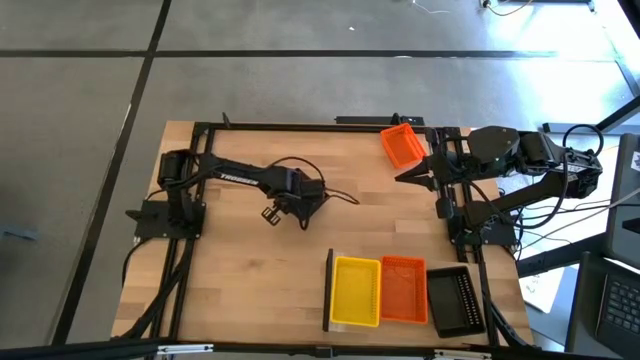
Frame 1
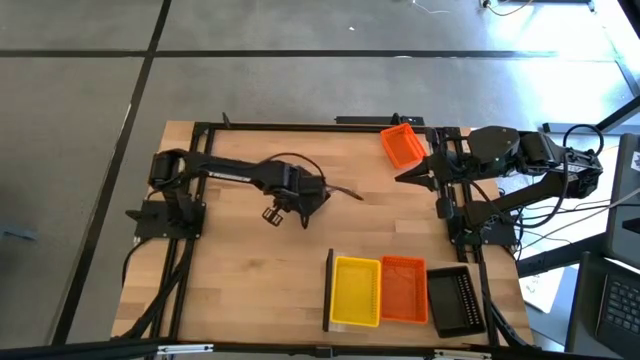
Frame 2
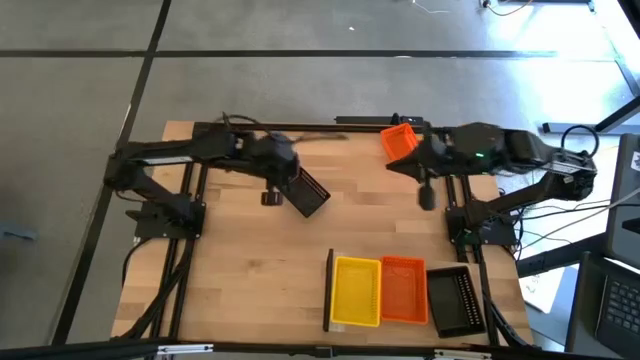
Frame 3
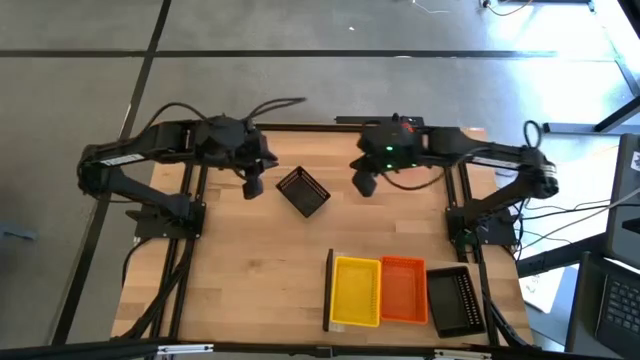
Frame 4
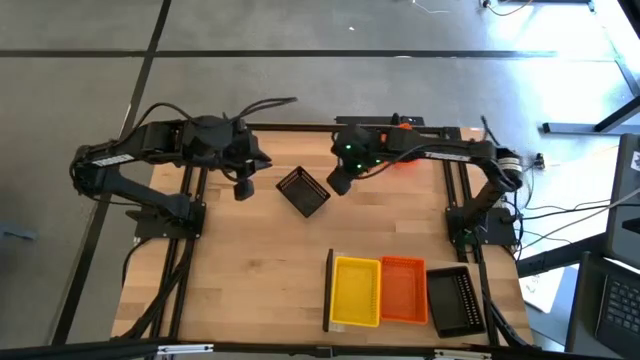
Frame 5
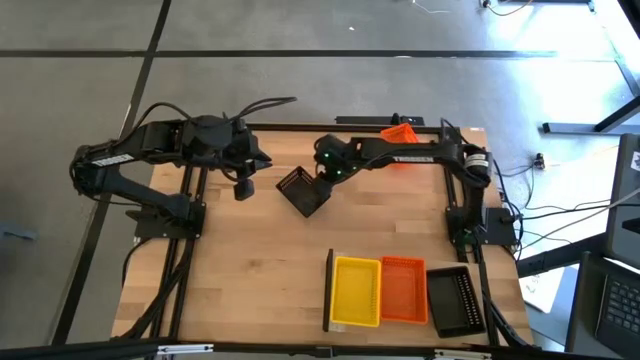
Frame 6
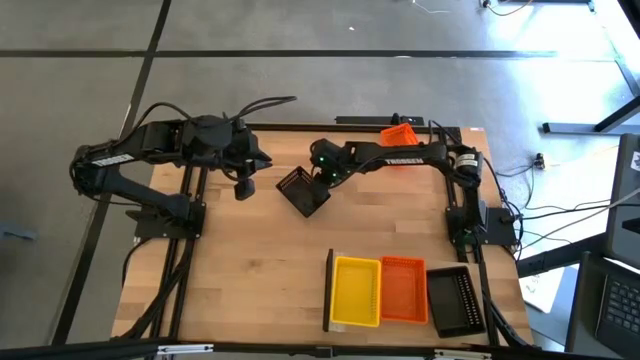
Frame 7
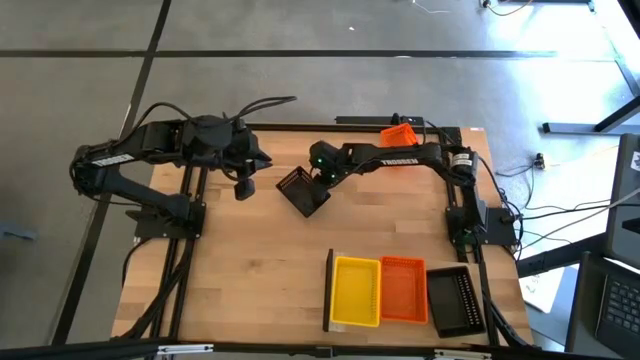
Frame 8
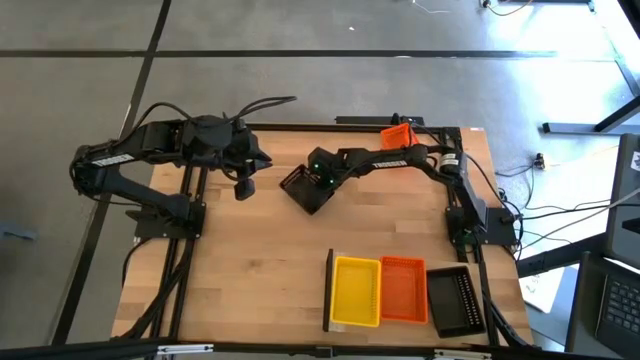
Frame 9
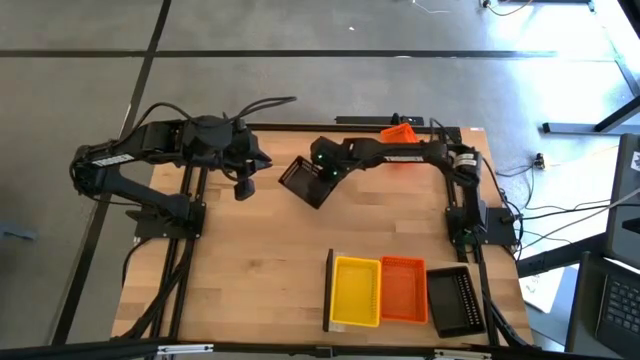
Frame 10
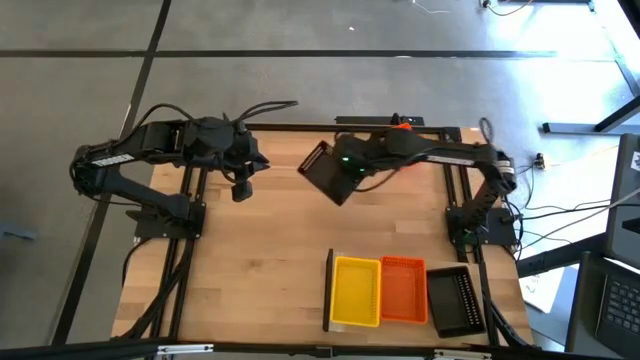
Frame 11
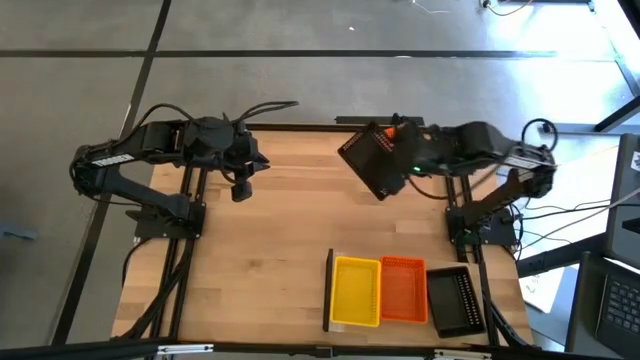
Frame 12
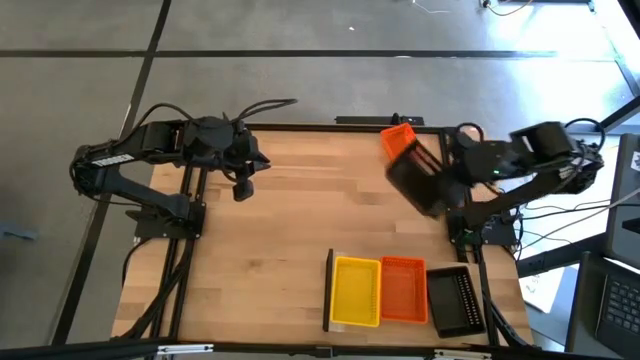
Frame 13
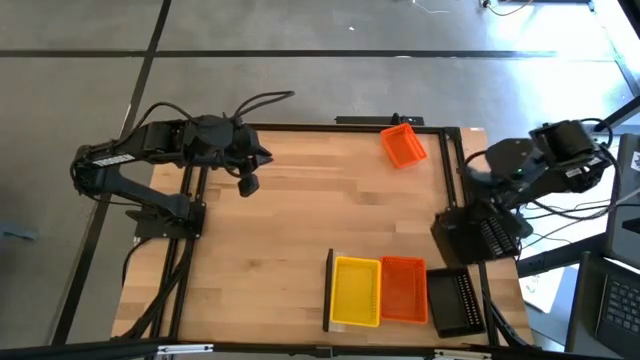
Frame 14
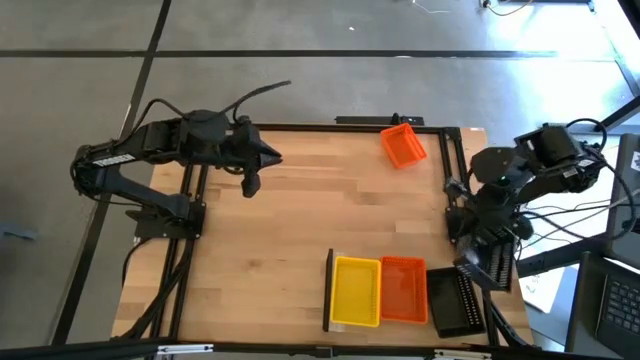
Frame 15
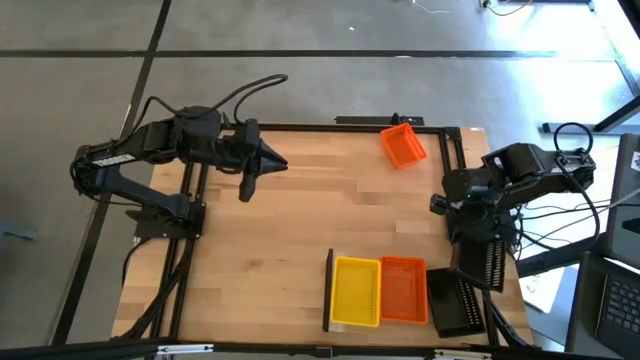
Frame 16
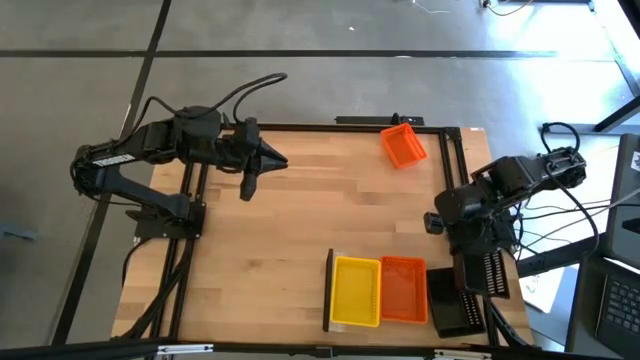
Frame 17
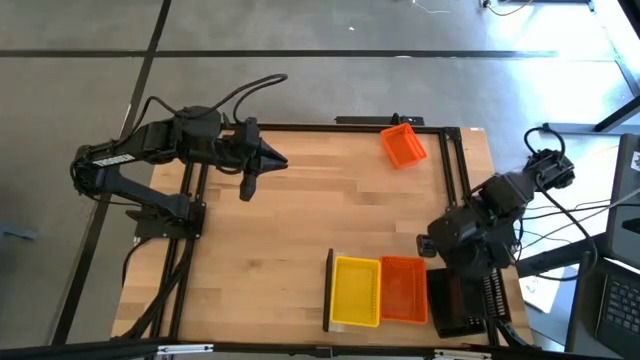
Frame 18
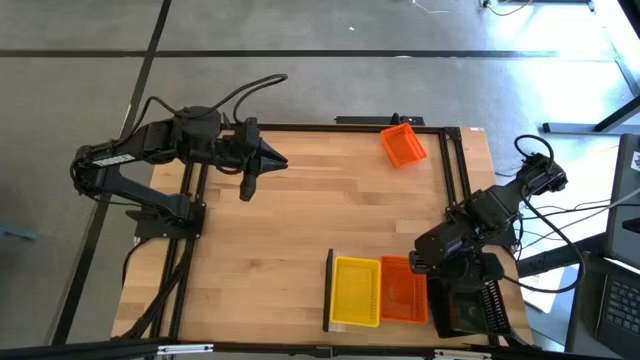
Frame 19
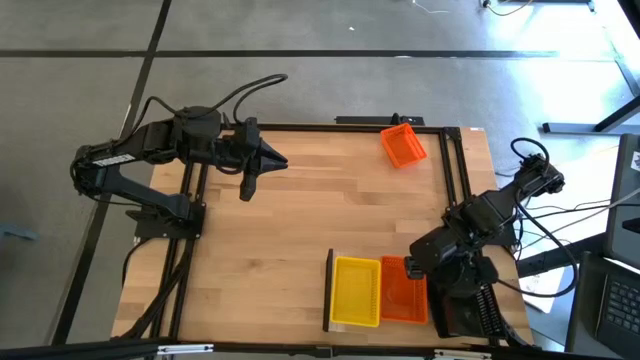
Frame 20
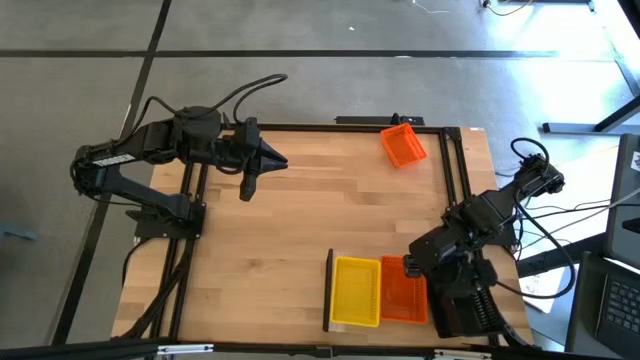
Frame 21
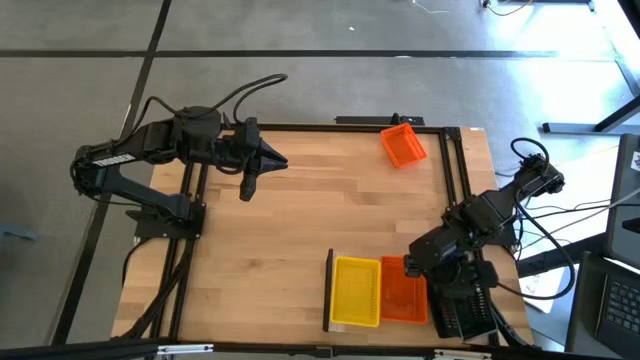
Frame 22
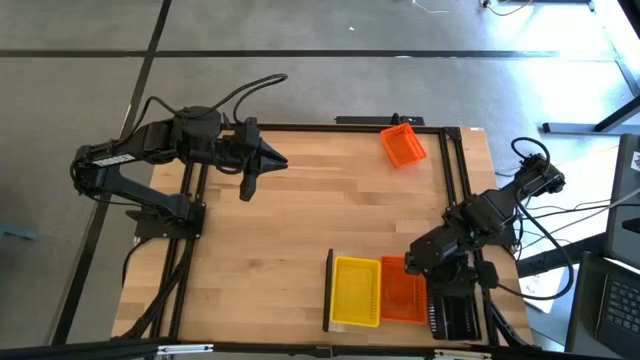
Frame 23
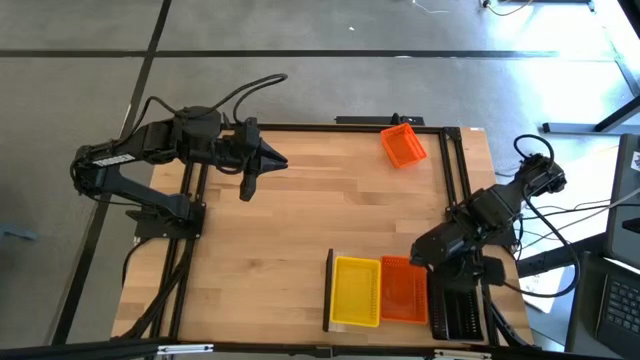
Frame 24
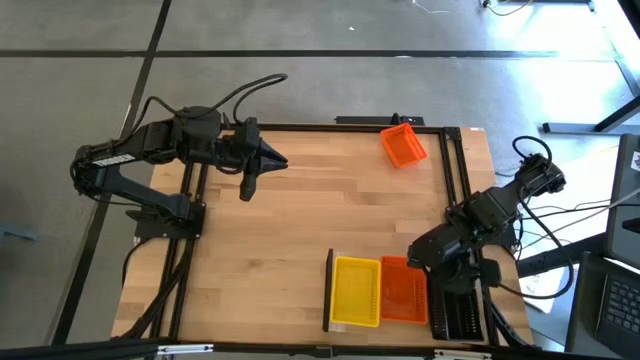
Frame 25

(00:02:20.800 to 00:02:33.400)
Task: Stack baskets on shelf by color
Stack the black bin on top of the black bin

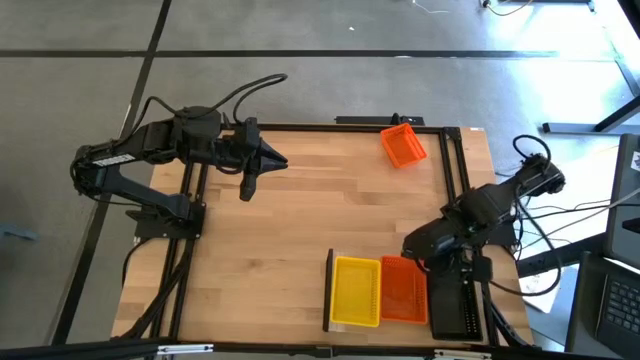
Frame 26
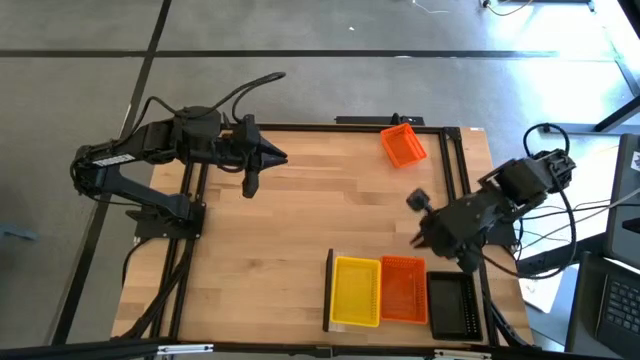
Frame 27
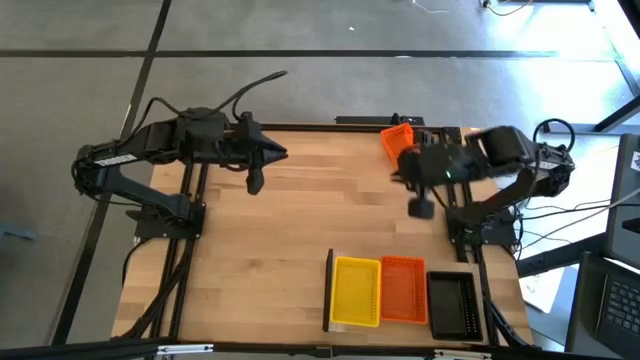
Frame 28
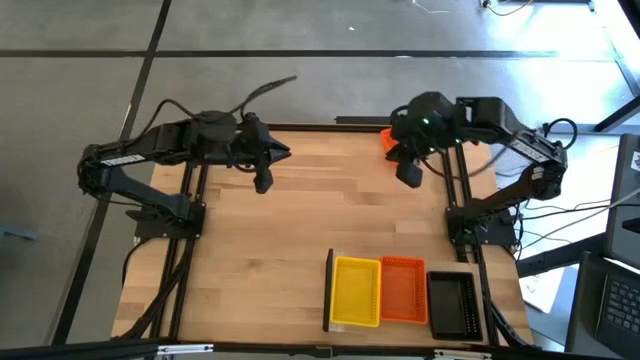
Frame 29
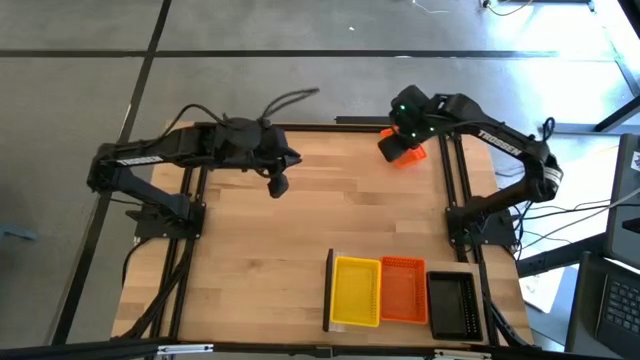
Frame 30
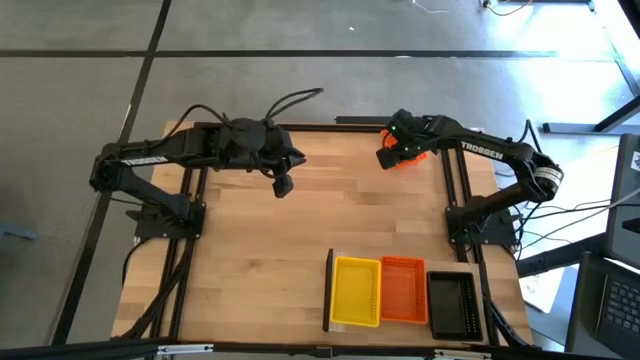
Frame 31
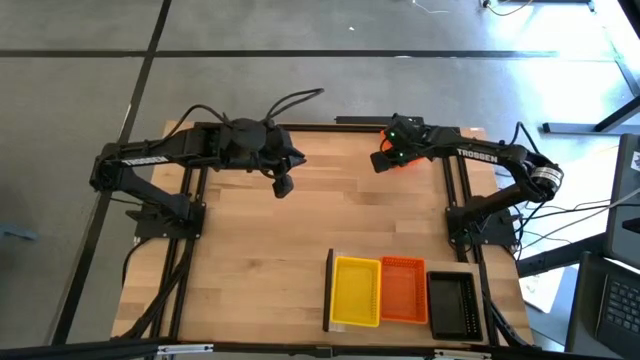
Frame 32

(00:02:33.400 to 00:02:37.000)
Stack the orange bin on top of the orange bin

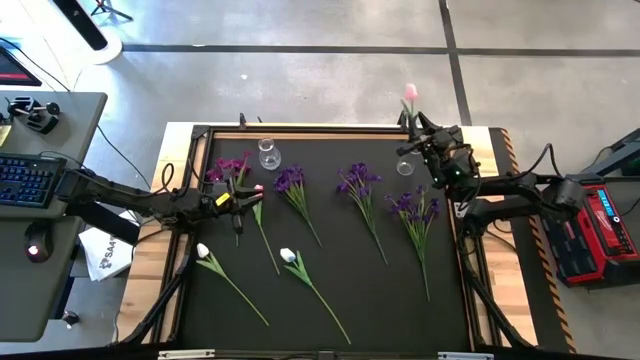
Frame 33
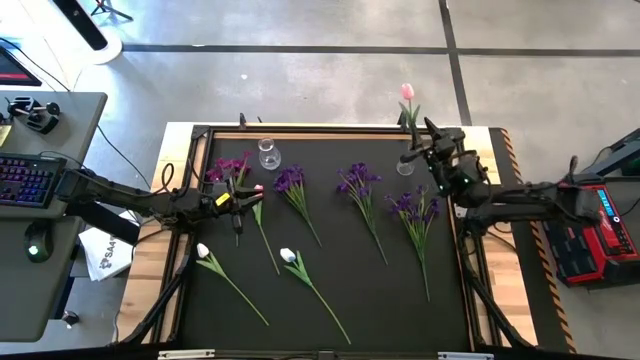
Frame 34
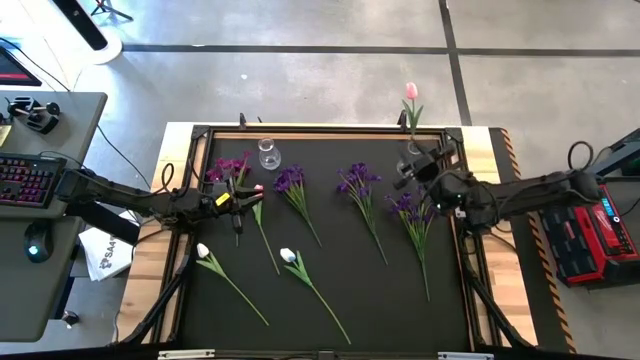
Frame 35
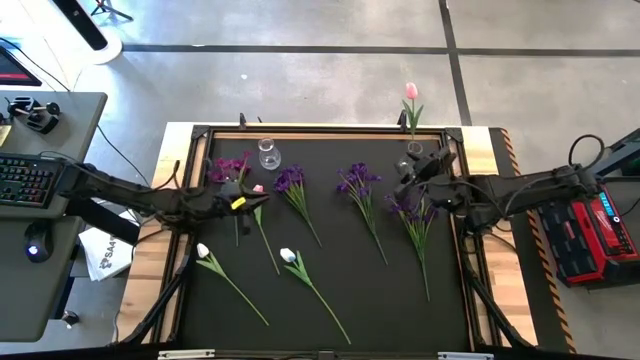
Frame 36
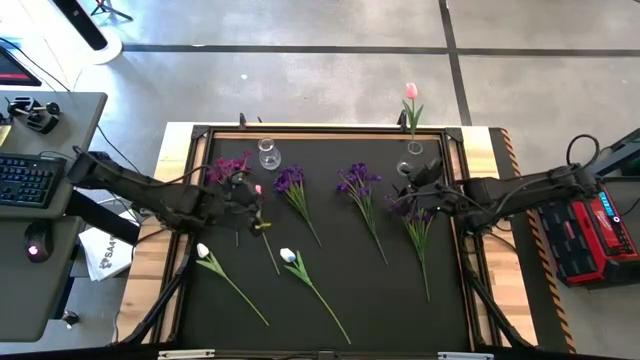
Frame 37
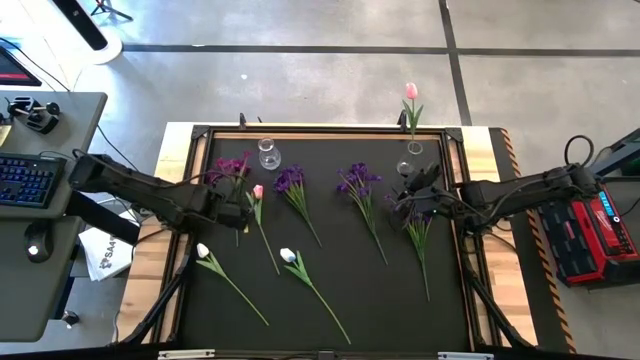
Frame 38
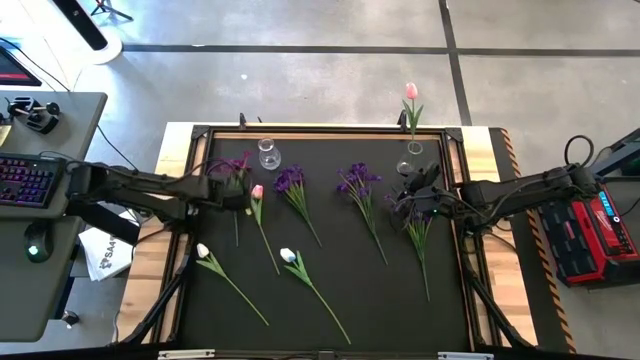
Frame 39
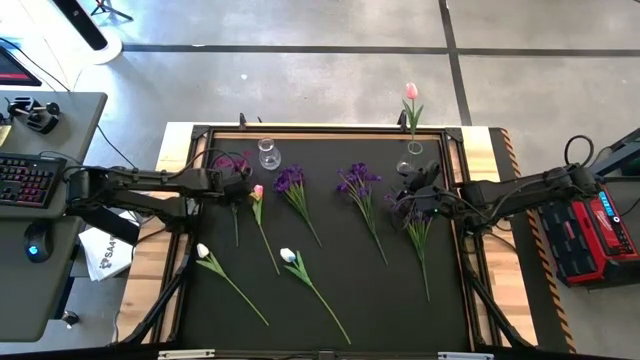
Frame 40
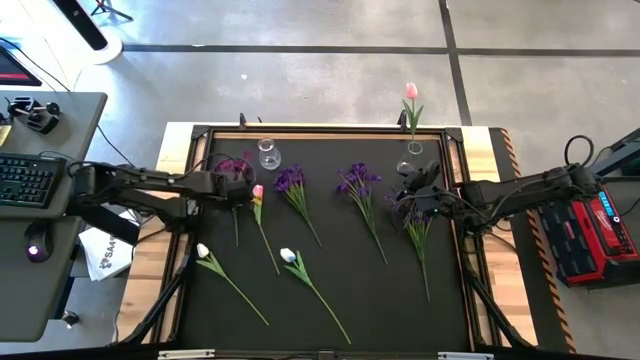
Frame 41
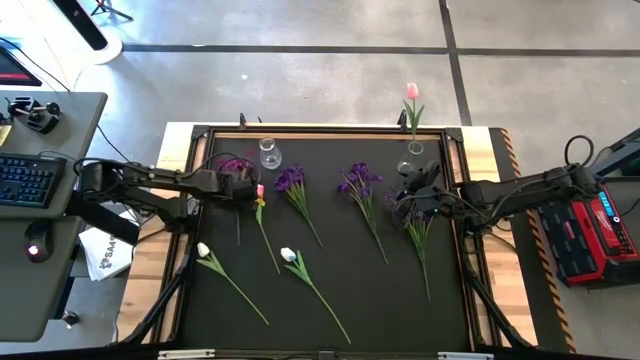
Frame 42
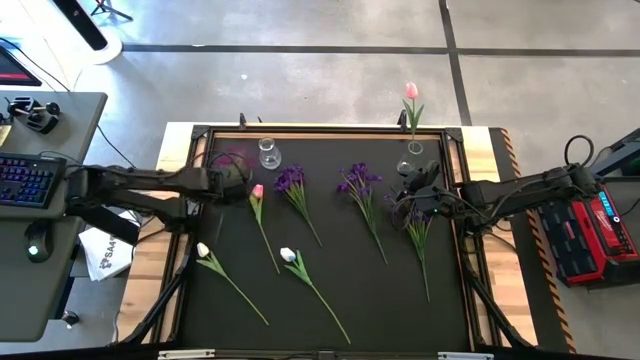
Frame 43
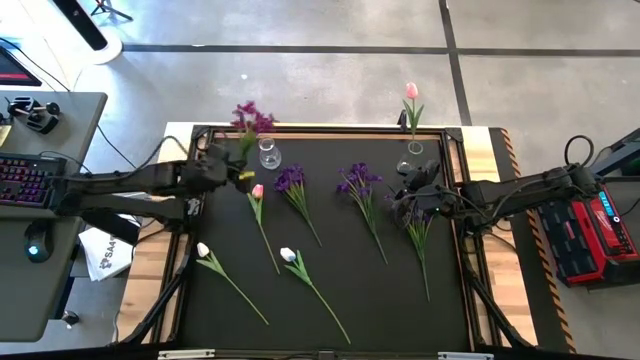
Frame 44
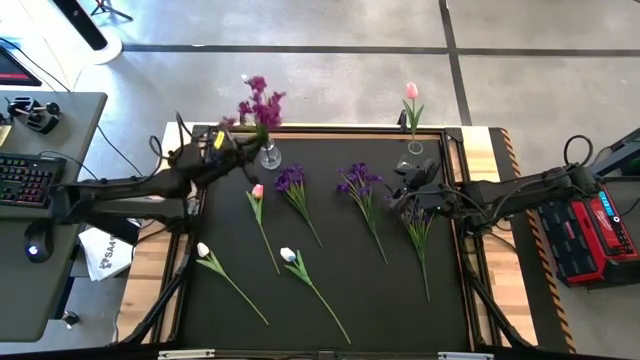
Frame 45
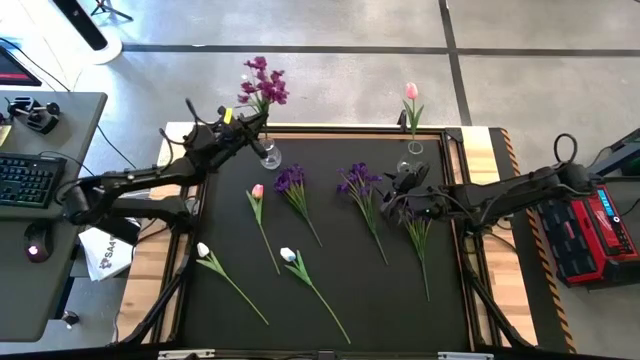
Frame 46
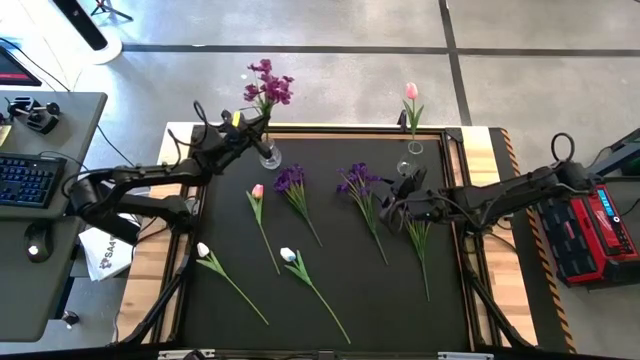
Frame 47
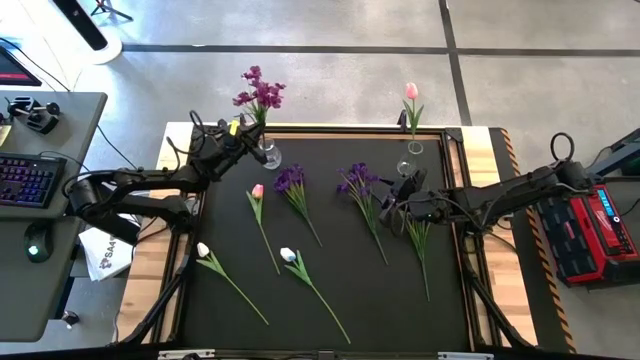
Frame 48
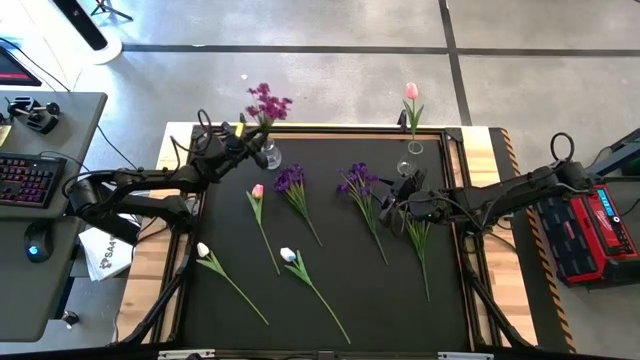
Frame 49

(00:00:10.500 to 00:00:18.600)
Task: Sort flowers into vase by color
Put the purple flowers into the left transparent vase
